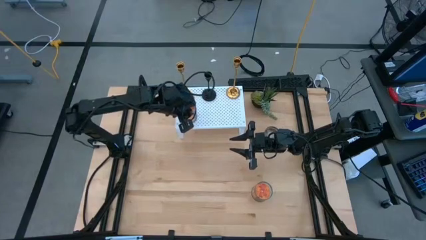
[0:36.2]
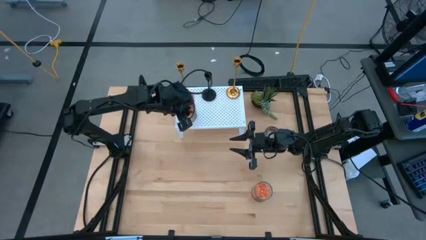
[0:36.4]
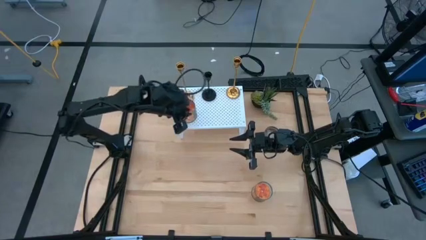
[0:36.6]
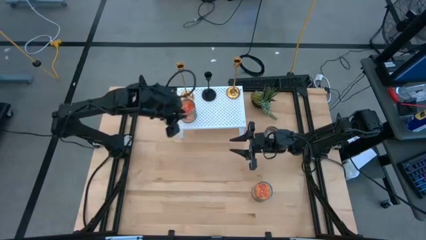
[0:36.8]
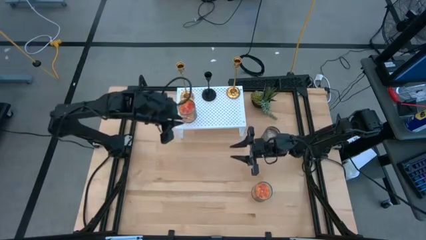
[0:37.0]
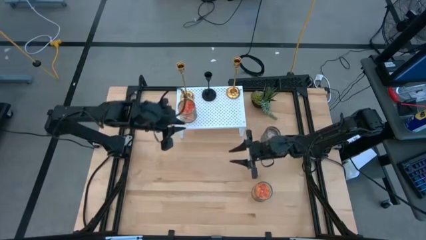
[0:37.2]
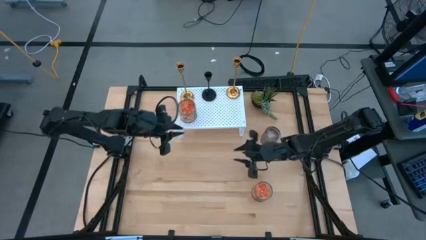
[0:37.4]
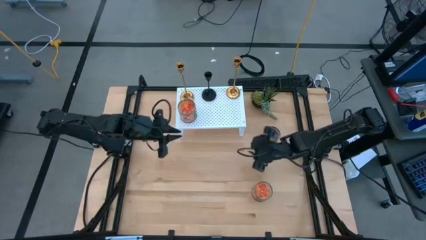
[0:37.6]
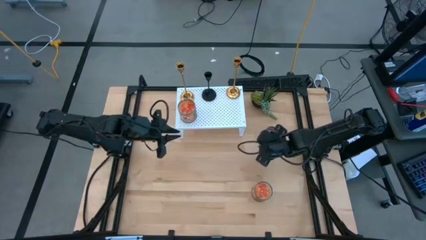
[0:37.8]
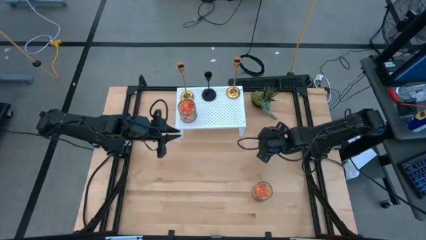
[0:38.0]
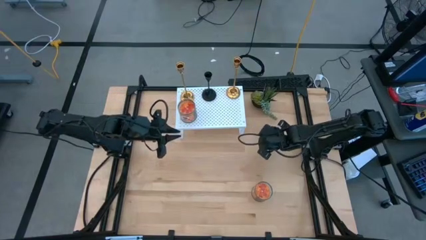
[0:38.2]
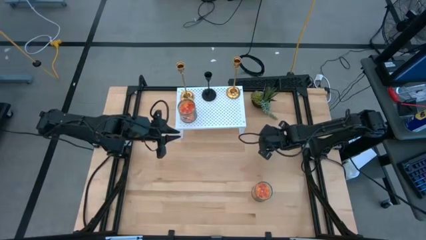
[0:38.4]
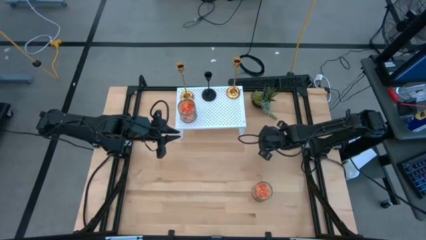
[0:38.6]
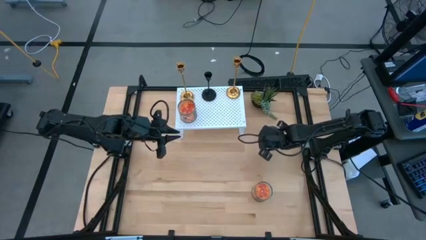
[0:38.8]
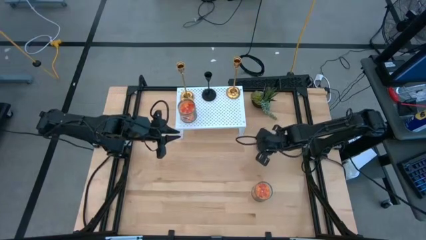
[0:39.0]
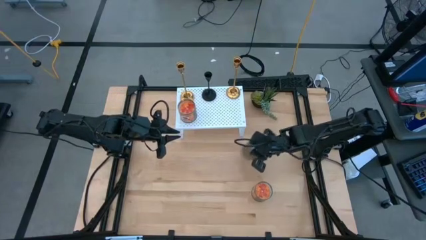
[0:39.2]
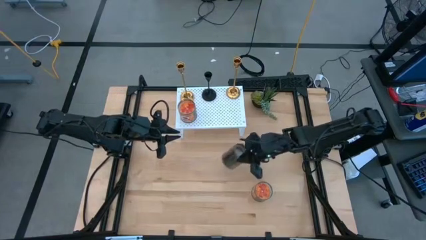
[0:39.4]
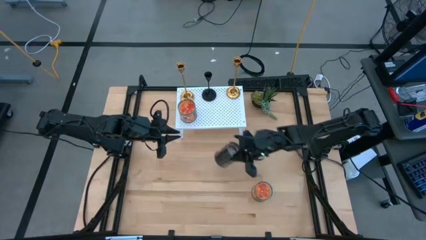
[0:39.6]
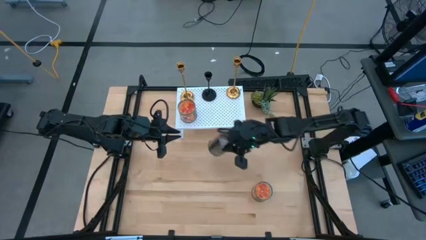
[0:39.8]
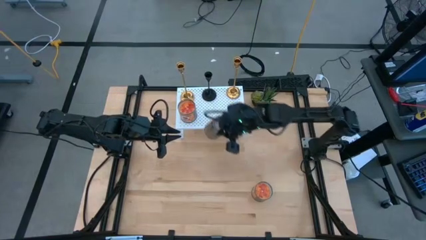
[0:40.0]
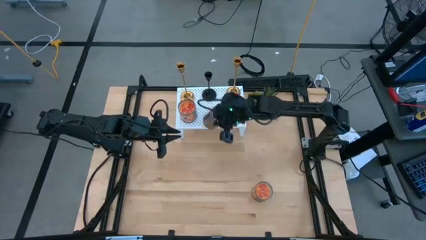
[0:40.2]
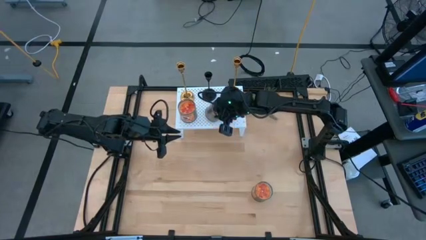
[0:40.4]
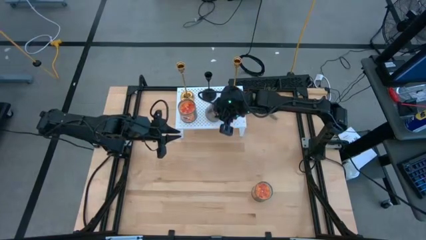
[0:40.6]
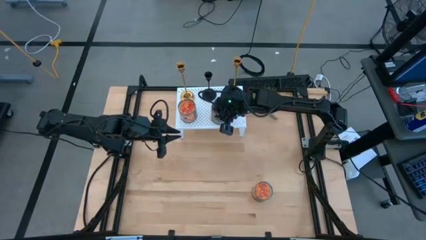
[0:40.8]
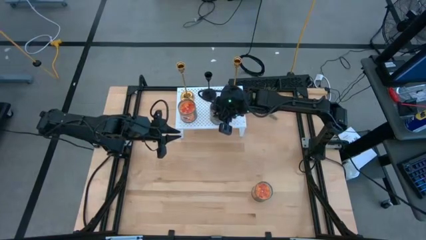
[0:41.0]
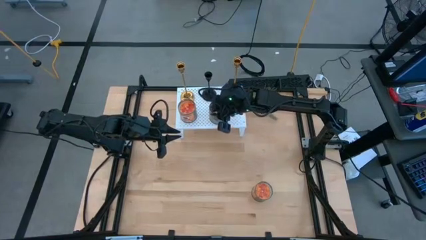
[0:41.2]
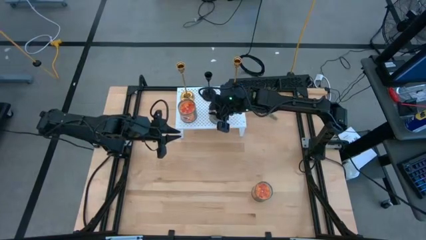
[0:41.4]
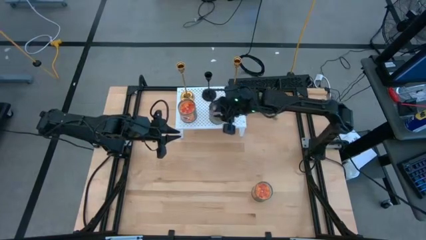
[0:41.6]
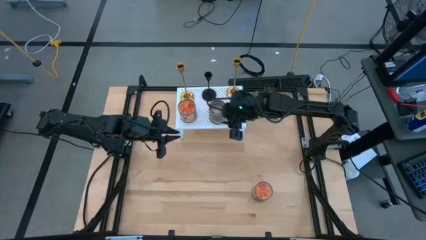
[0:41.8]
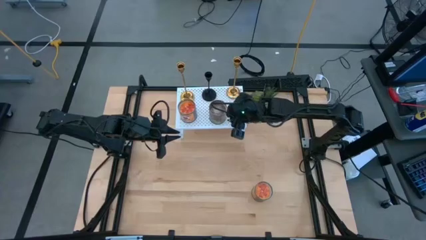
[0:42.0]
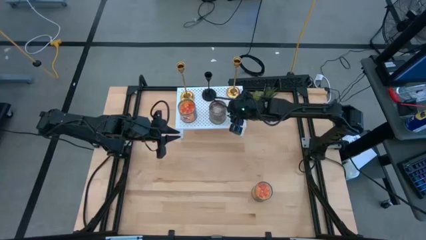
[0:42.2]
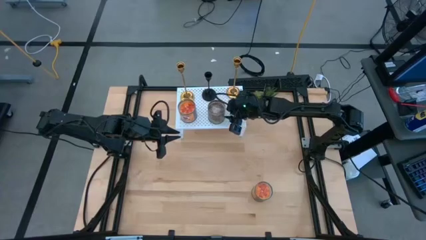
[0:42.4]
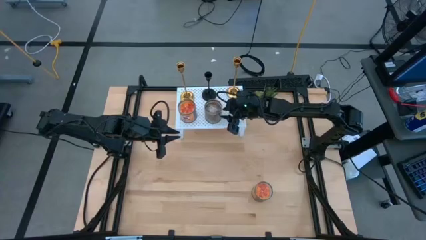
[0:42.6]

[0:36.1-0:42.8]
Task: Pick & Place candle stick holders
Put the brown scented candle on the shelf

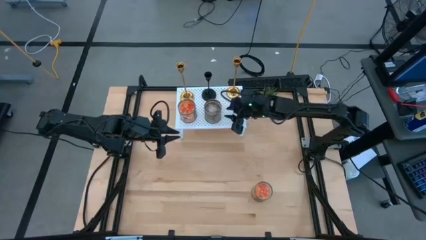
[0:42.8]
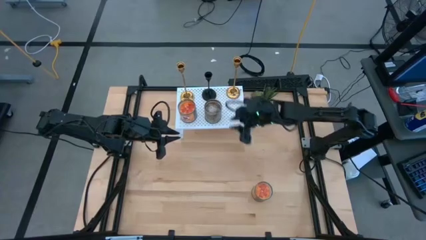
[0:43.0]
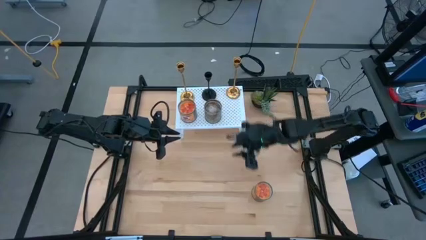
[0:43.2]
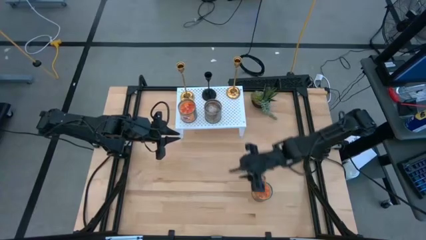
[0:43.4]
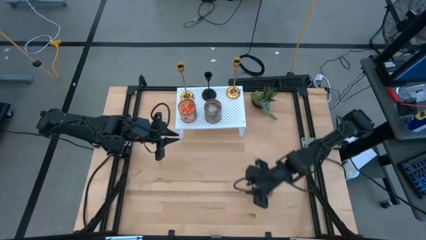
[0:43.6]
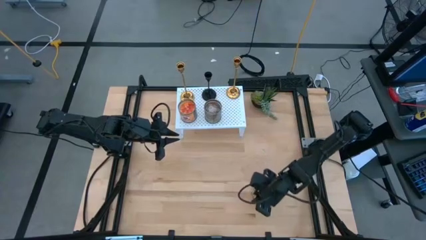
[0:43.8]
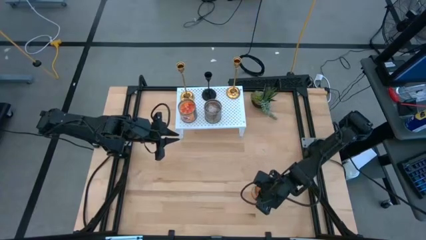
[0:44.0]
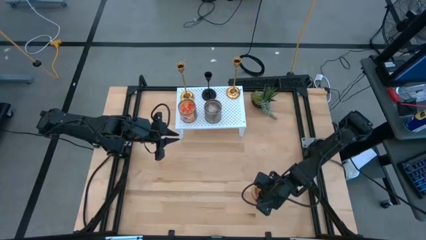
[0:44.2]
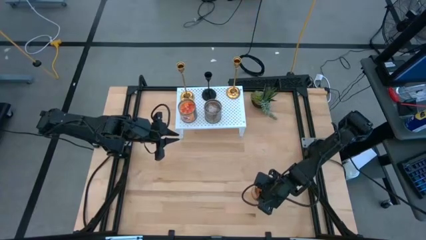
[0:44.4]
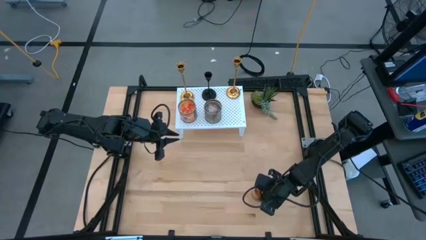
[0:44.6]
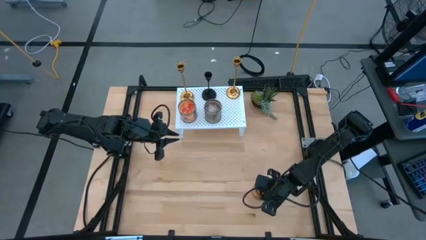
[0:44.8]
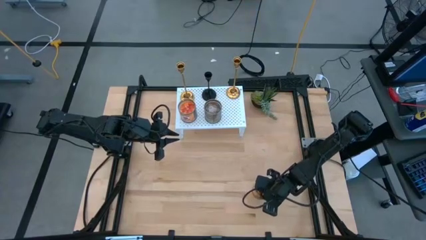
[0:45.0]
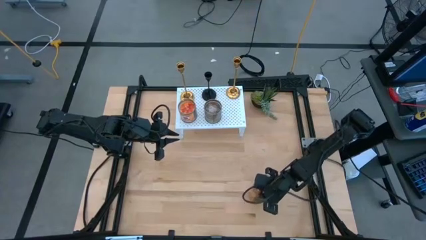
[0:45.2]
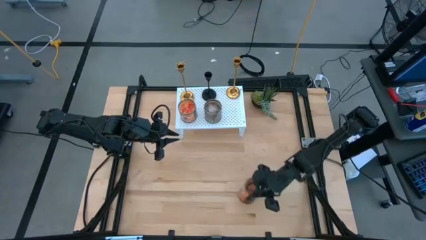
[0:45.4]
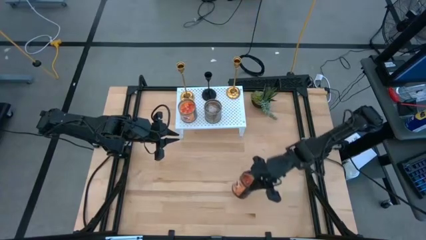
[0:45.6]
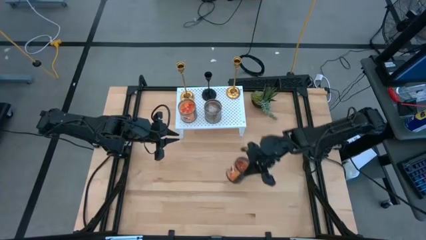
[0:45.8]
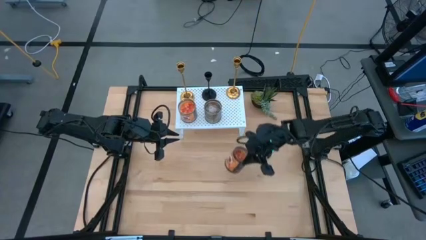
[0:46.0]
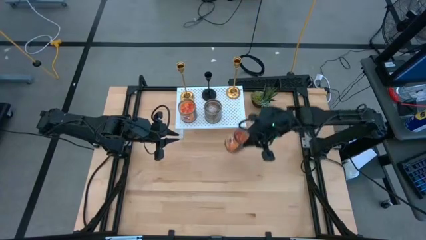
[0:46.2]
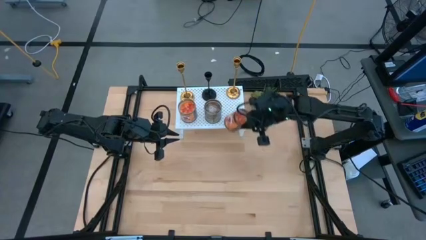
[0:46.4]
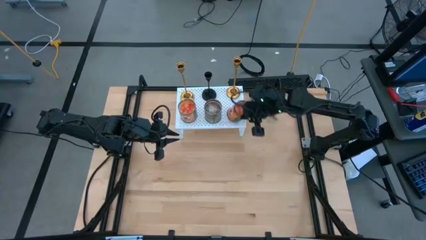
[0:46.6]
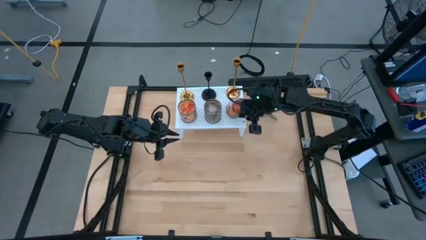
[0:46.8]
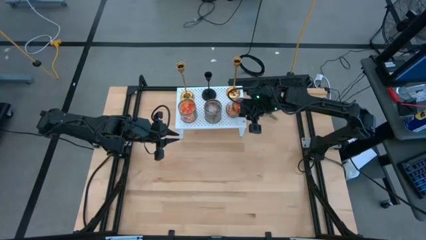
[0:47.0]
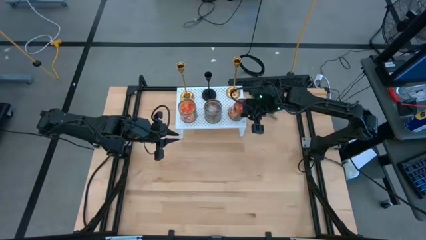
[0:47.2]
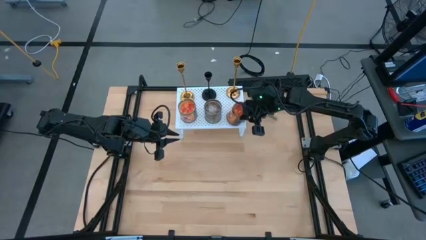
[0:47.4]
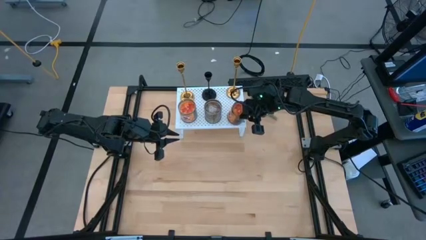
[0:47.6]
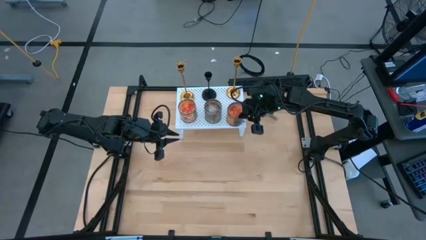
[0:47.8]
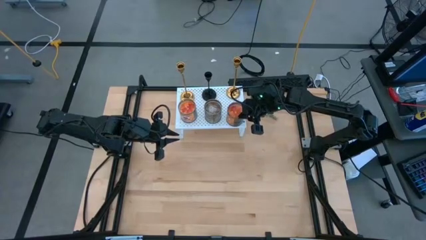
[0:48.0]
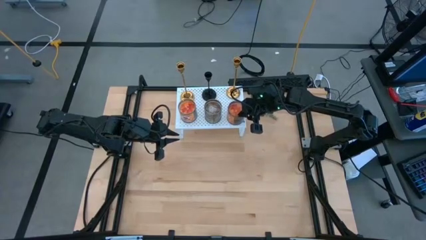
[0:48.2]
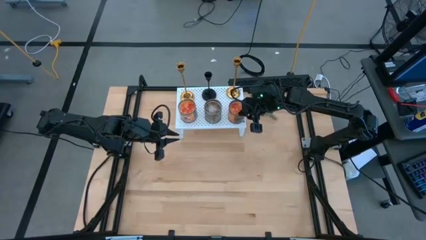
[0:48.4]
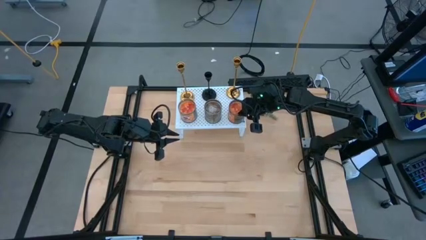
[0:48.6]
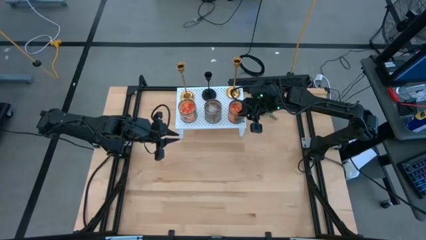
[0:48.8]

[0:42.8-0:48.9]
Put the orange scented candle on the shelf

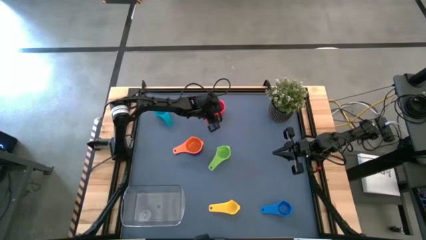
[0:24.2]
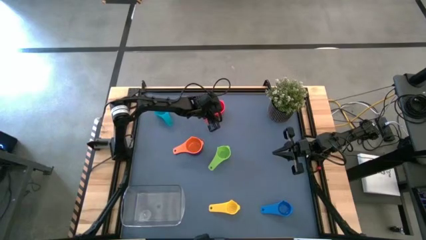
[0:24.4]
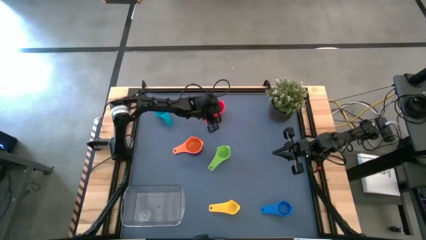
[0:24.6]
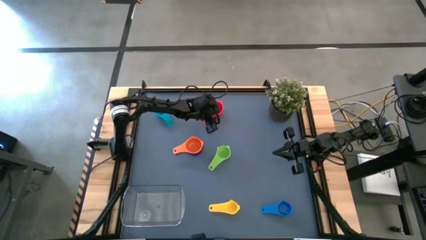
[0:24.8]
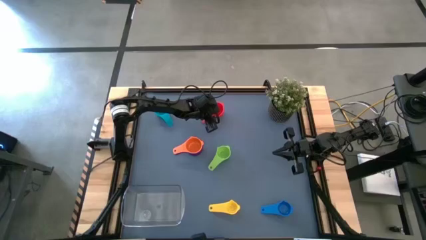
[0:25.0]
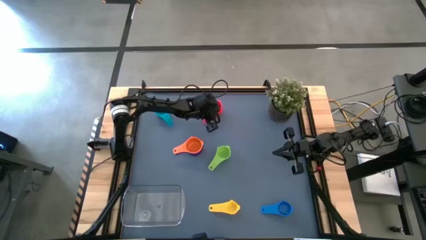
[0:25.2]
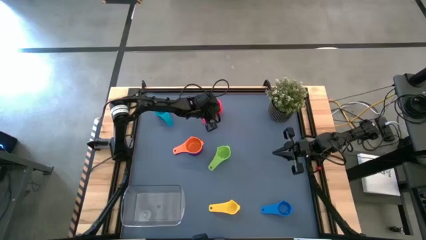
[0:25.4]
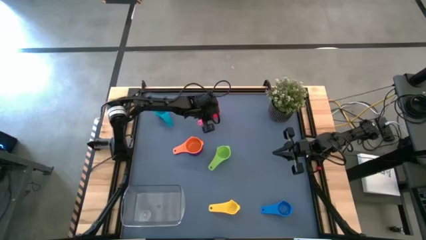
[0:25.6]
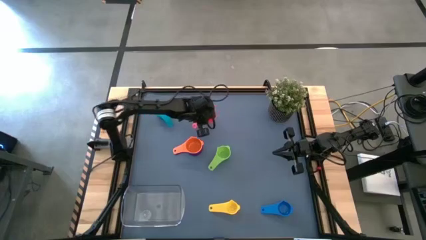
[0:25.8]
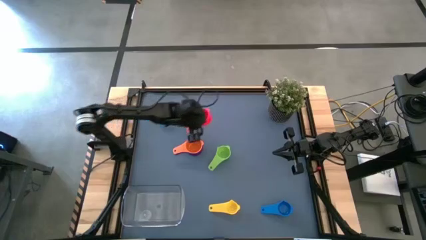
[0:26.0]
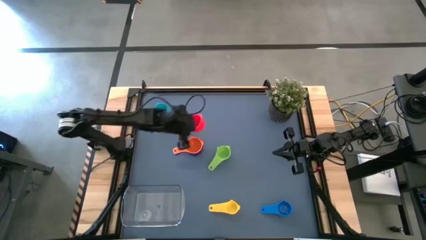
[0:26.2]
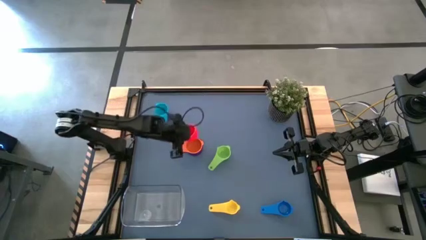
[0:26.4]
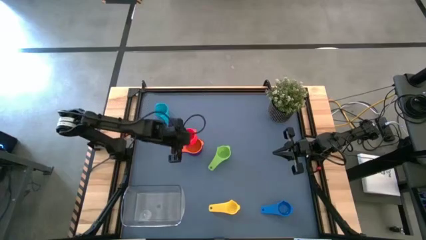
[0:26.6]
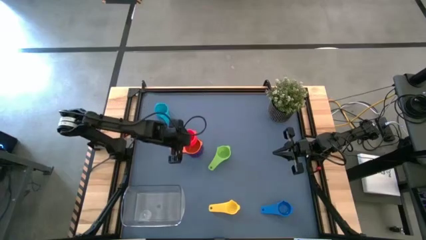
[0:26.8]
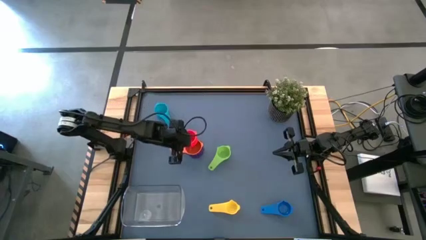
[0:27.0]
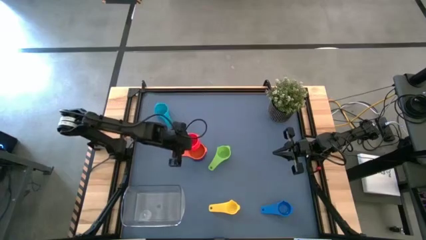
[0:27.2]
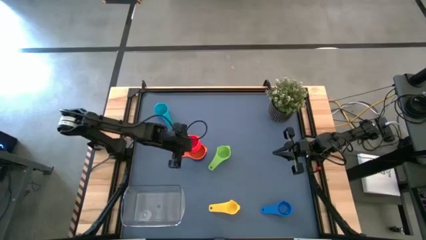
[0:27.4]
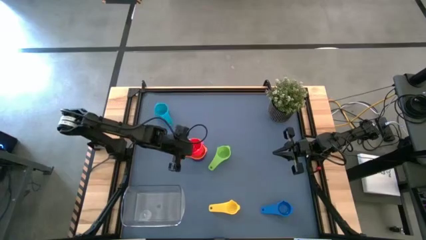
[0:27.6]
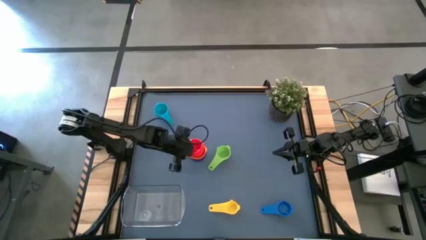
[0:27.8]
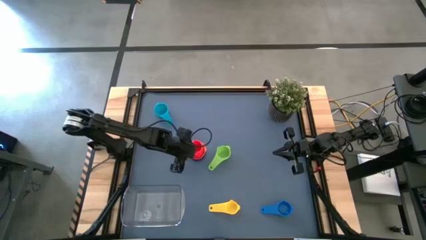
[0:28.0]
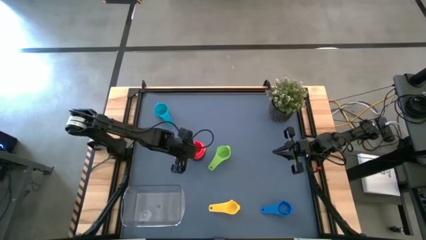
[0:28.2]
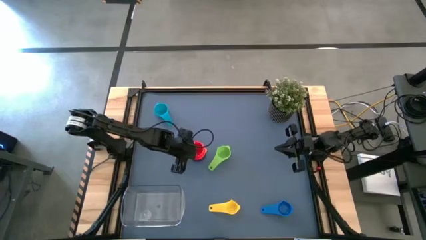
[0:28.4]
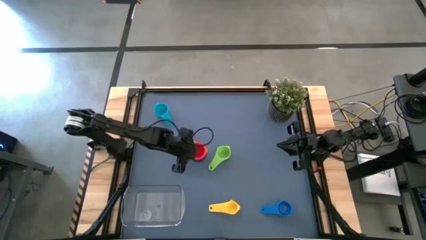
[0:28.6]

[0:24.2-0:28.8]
Task: Nest measuring cups in basket
Stack the red measuring cup on top of the orange measuring cup
